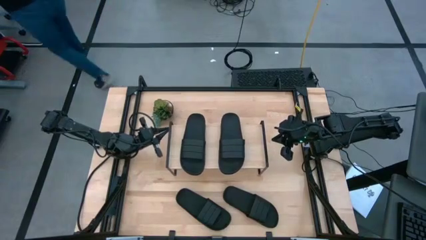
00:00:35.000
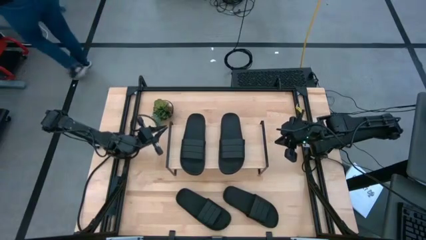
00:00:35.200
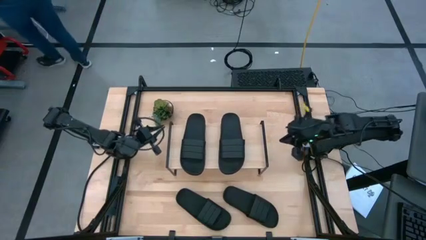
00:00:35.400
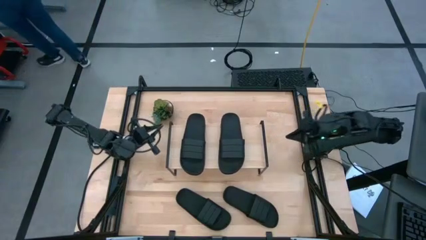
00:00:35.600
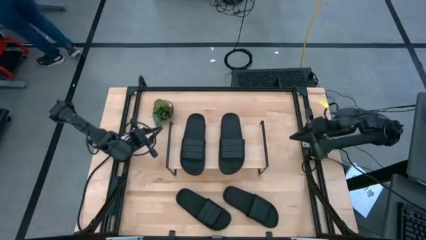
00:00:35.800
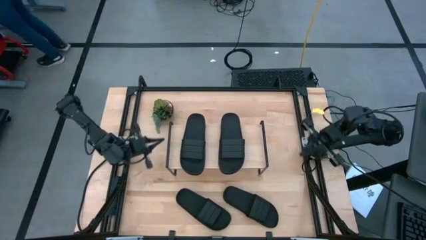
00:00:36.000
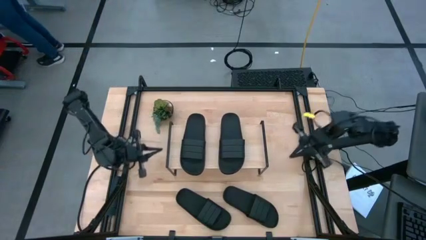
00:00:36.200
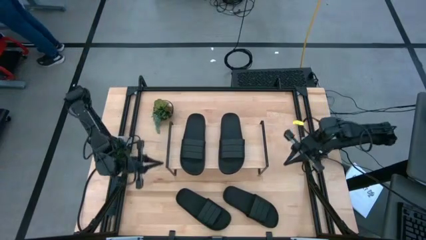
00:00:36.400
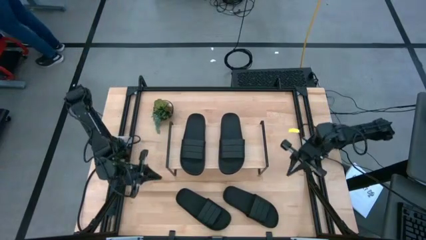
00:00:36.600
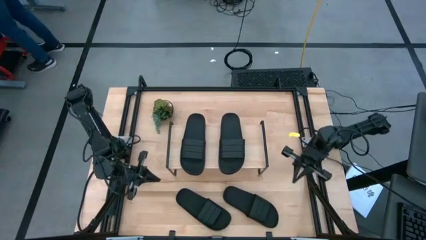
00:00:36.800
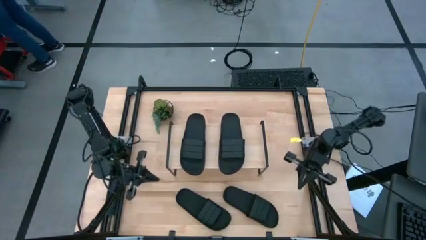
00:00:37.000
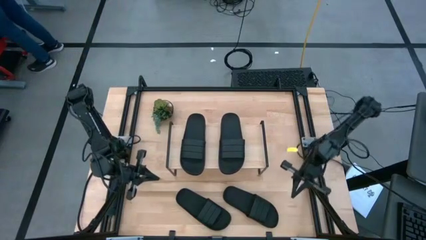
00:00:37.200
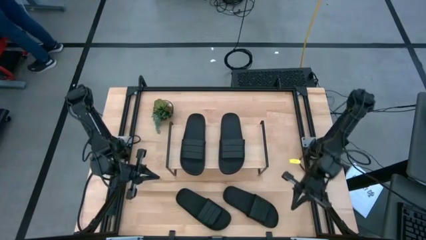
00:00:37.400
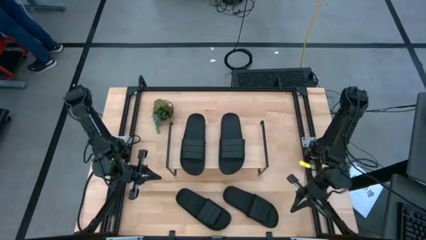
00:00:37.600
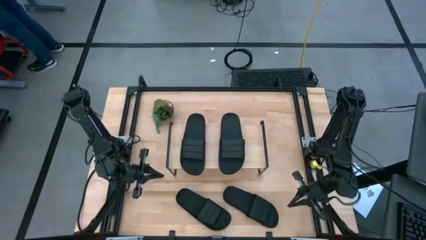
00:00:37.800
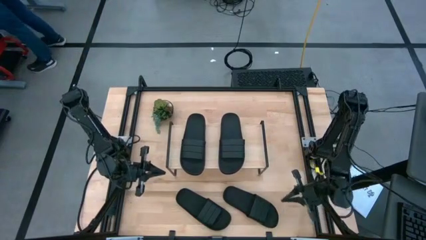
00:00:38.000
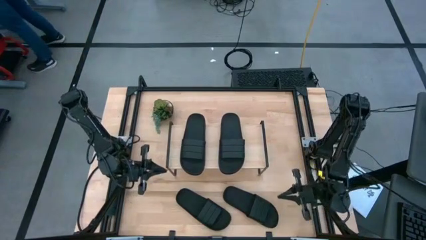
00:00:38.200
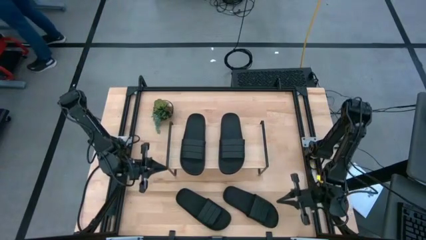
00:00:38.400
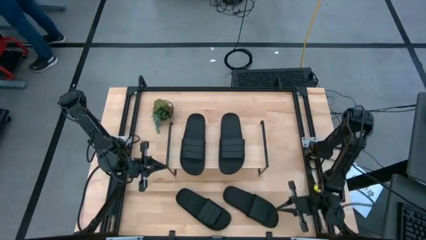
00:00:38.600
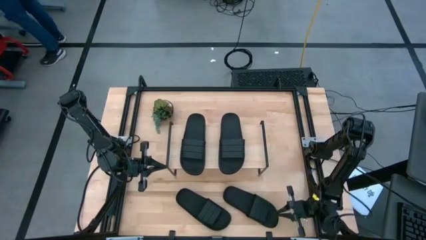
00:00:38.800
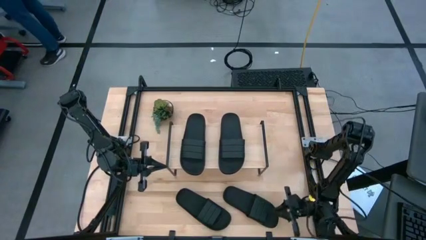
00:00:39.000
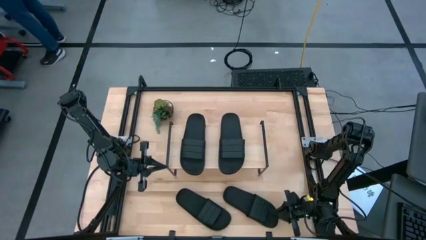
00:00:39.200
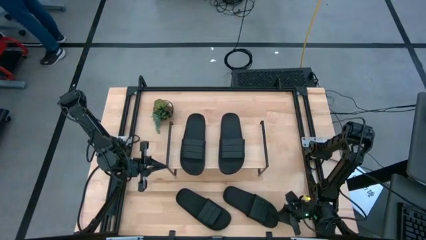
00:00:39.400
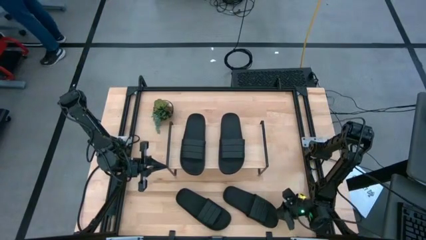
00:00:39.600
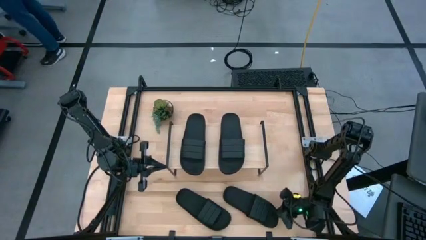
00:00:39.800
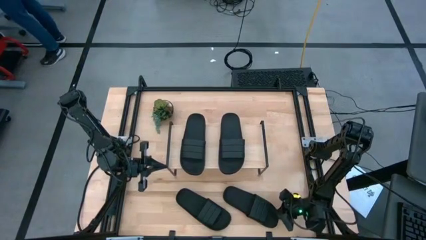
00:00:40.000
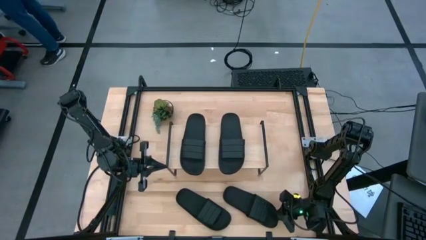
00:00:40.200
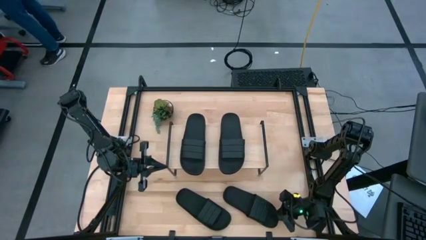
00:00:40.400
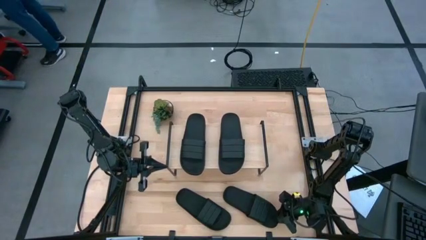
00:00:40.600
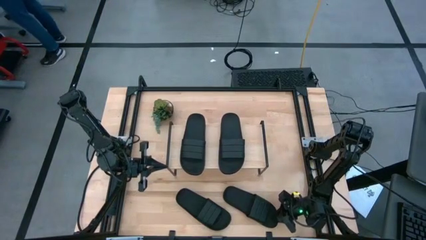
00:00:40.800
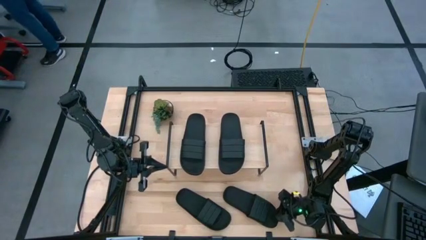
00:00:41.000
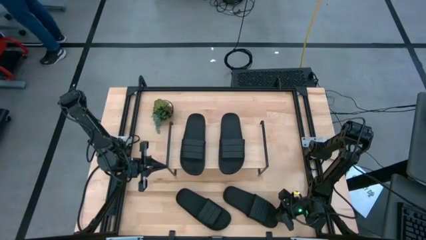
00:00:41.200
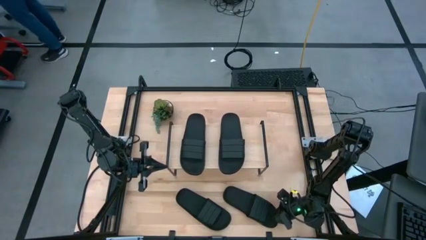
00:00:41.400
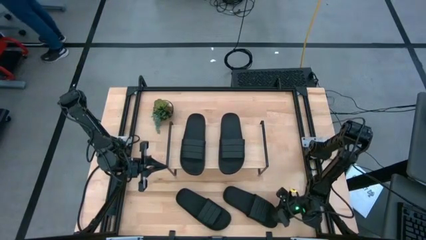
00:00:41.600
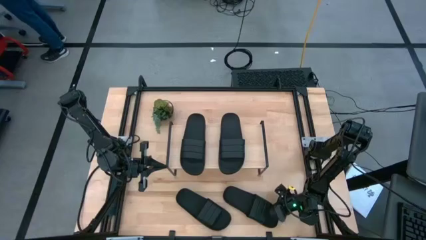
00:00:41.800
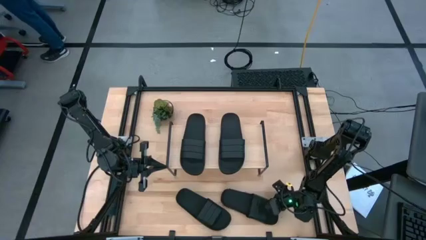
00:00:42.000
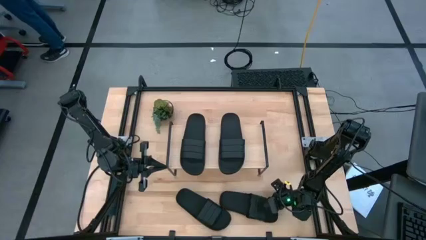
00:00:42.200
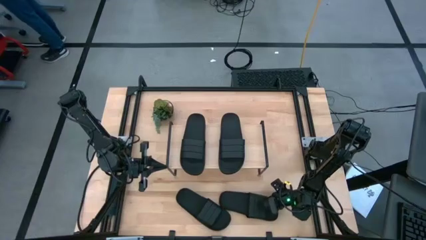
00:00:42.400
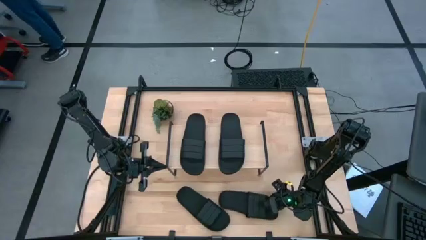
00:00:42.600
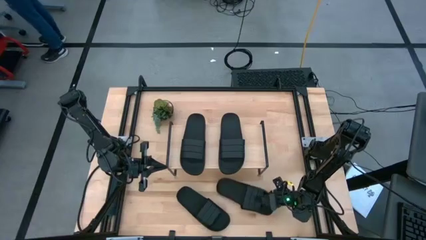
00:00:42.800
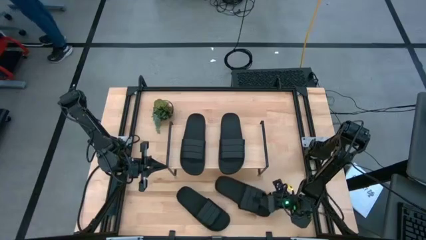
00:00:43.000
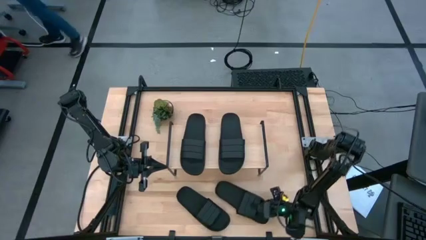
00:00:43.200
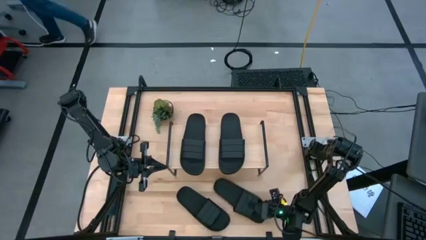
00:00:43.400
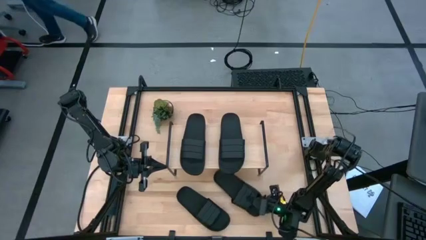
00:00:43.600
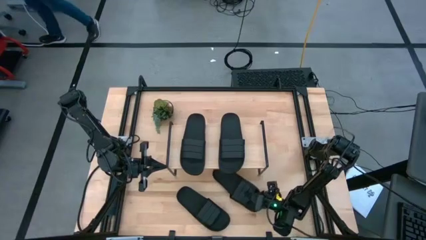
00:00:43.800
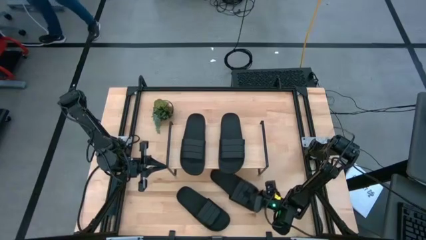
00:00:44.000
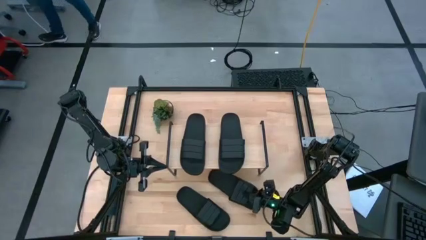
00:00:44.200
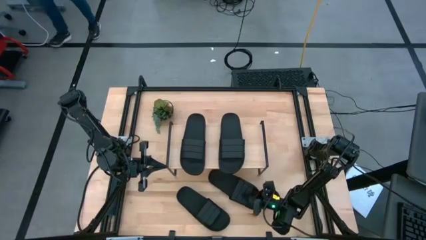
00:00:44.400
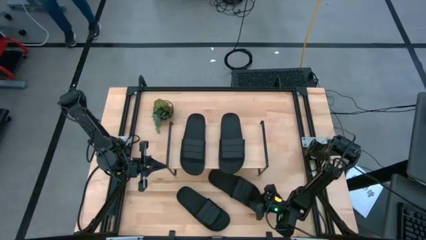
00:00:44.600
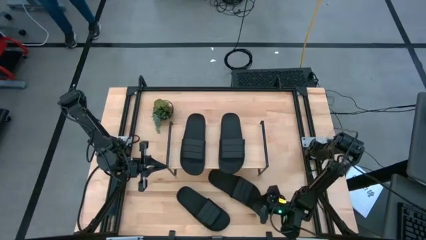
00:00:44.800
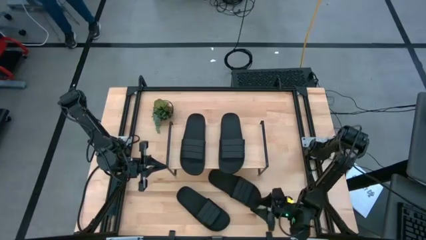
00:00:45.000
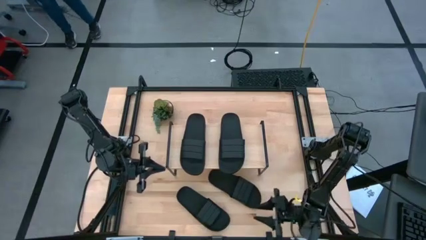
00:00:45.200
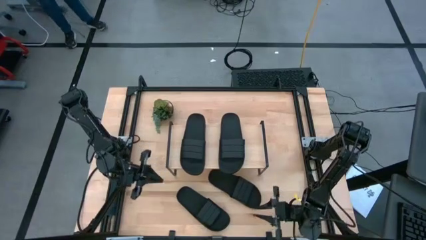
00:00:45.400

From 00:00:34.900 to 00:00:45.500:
Task: Pick and place slides into the shelf
Put the black slipper under the shelf

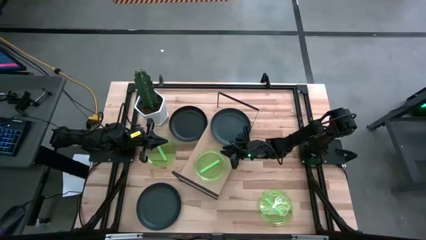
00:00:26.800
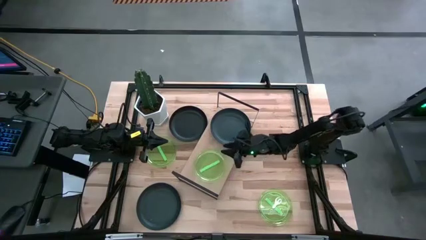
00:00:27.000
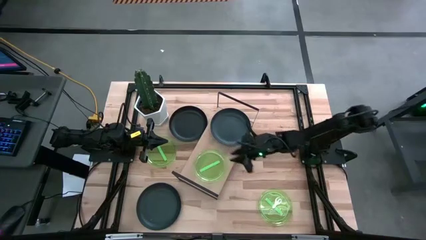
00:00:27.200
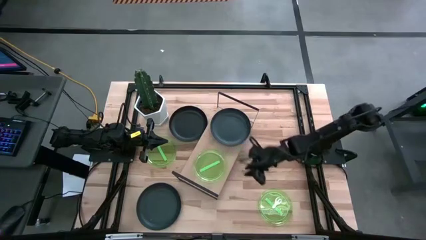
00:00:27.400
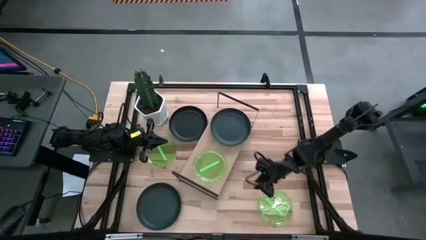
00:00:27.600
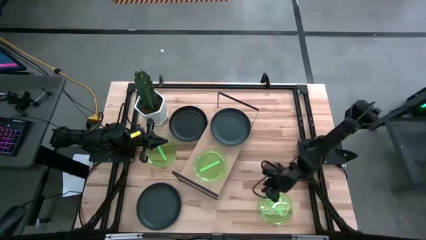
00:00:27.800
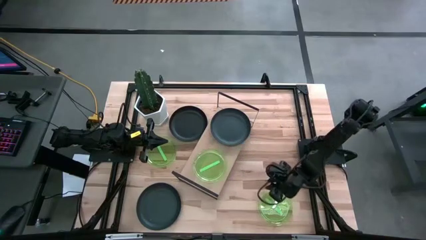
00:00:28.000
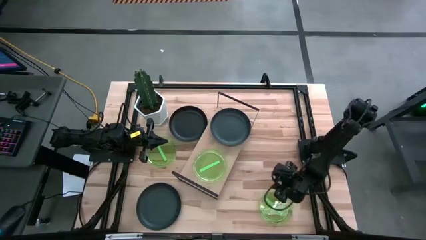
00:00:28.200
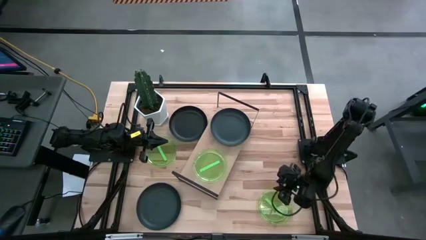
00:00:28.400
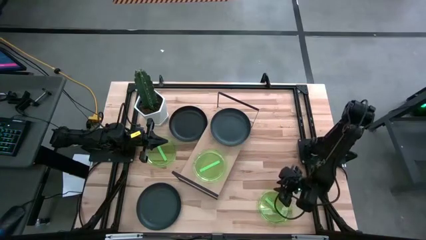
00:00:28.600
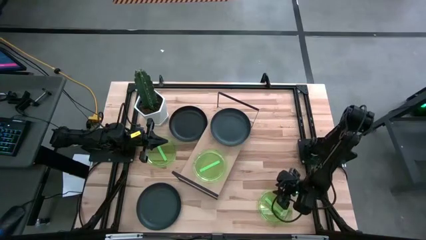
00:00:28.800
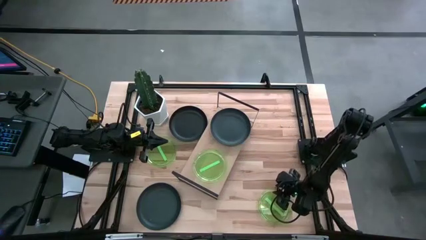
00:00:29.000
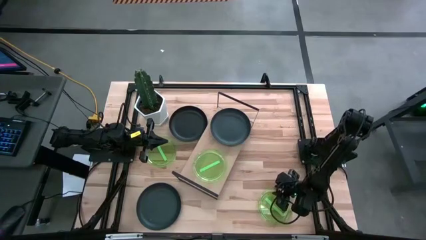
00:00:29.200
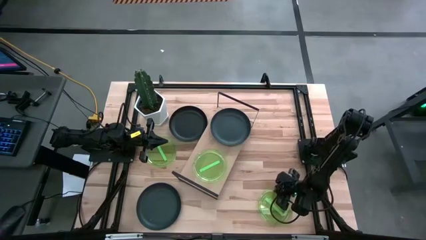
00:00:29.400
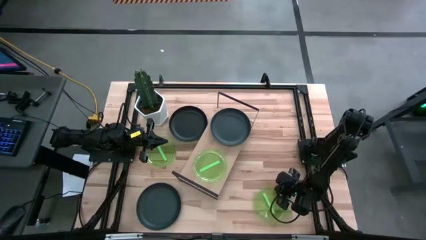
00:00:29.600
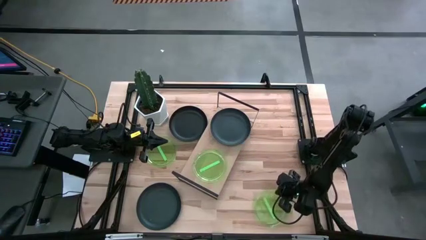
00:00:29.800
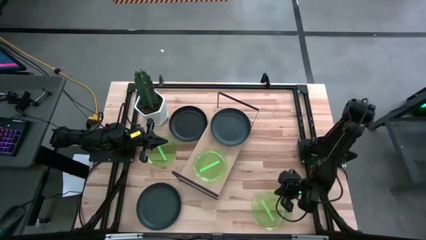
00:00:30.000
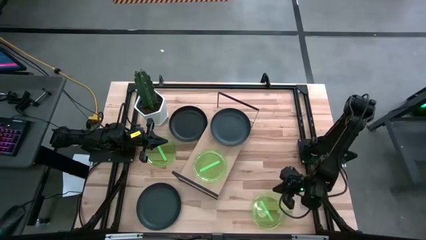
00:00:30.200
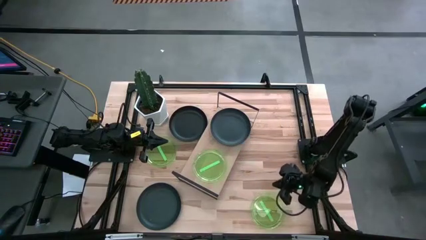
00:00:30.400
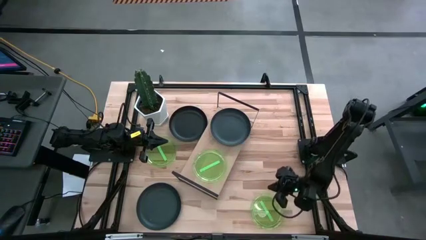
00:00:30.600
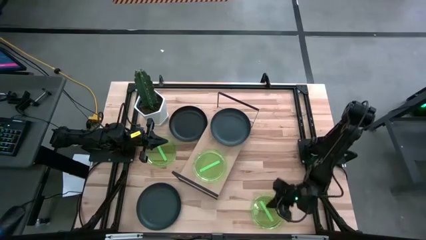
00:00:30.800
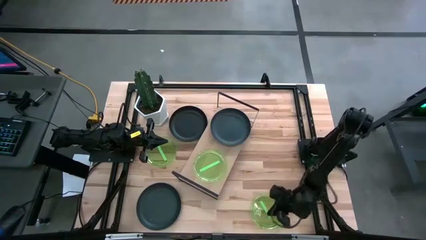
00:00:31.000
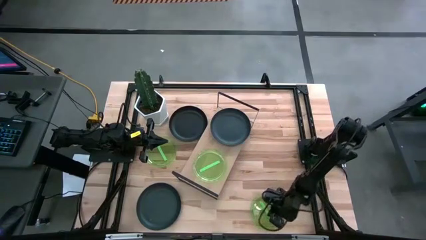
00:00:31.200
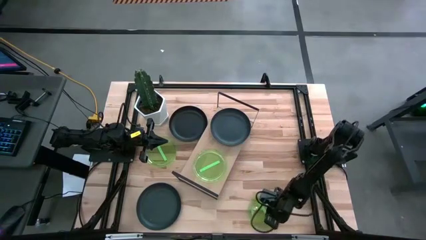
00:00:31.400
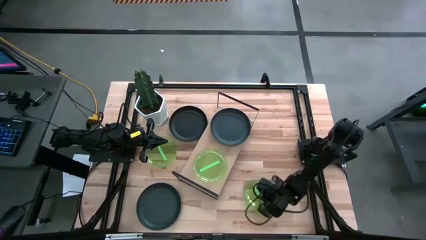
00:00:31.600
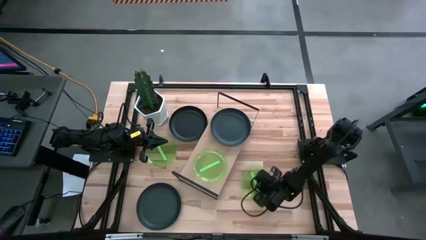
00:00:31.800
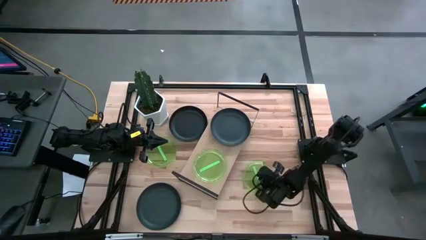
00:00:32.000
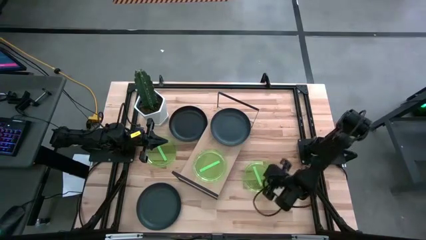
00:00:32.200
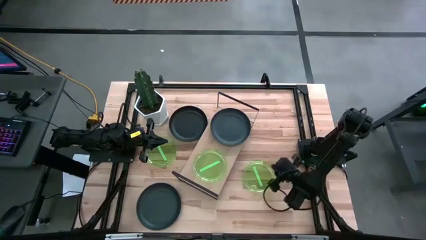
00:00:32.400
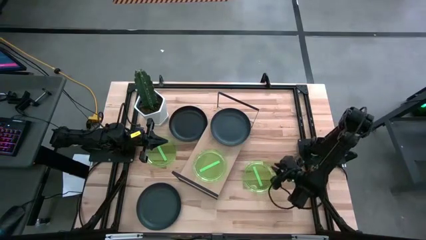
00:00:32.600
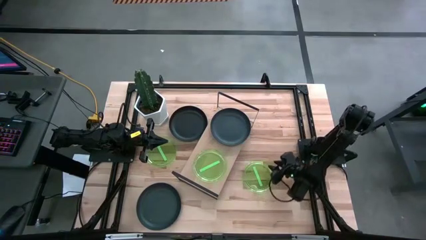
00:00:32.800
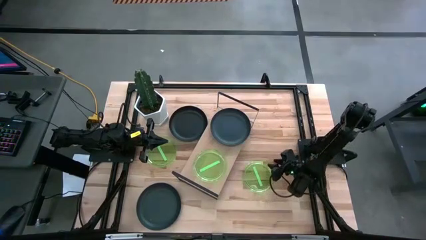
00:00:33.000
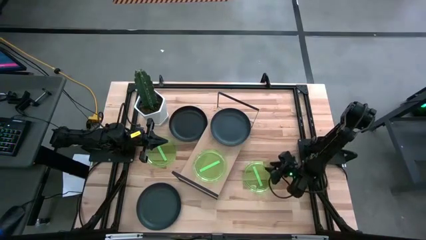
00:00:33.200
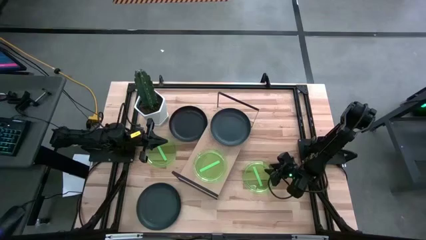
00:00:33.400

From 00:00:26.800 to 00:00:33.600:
Task: Place and stack plates onto a shelf
Stack the bottom green plate on top of the green plate on the shelf
